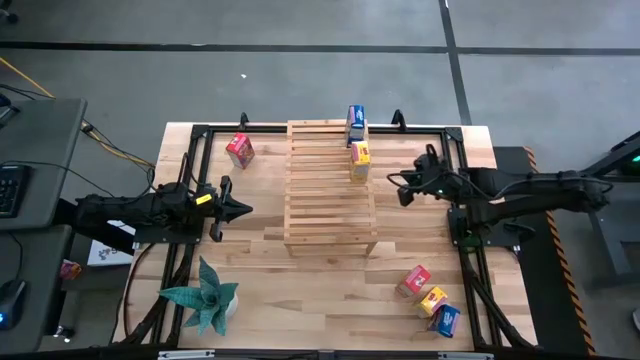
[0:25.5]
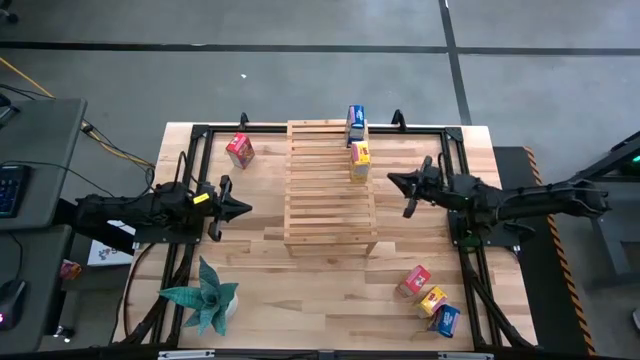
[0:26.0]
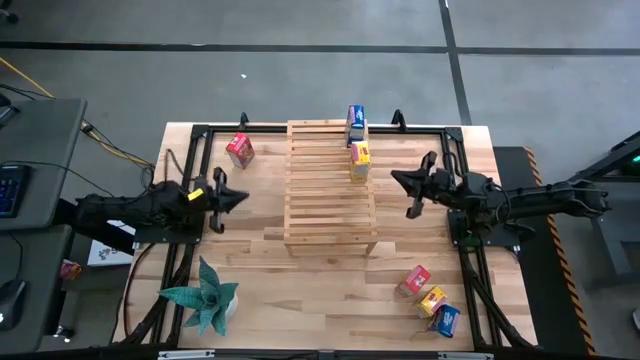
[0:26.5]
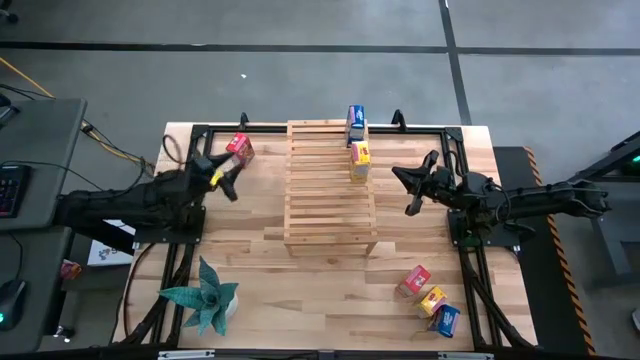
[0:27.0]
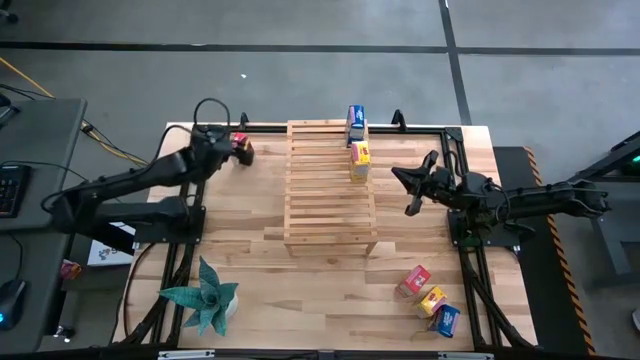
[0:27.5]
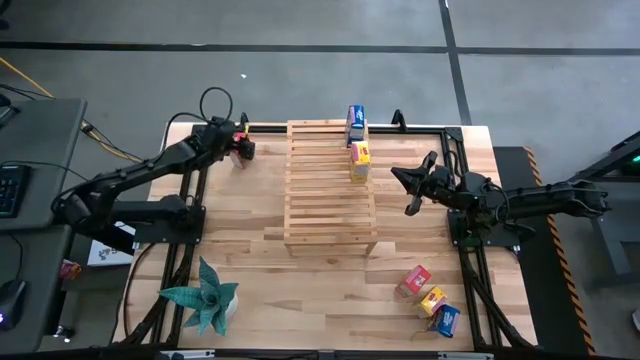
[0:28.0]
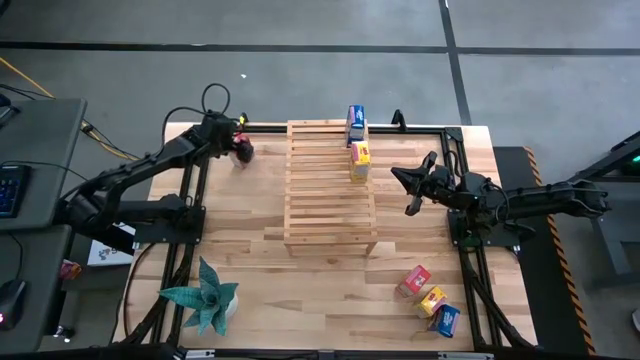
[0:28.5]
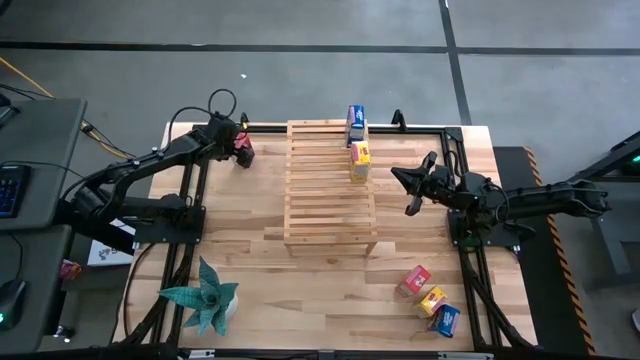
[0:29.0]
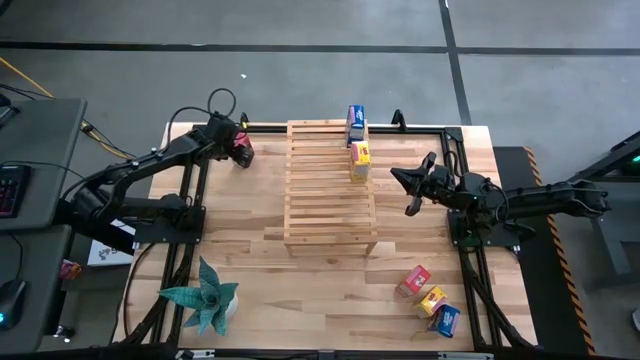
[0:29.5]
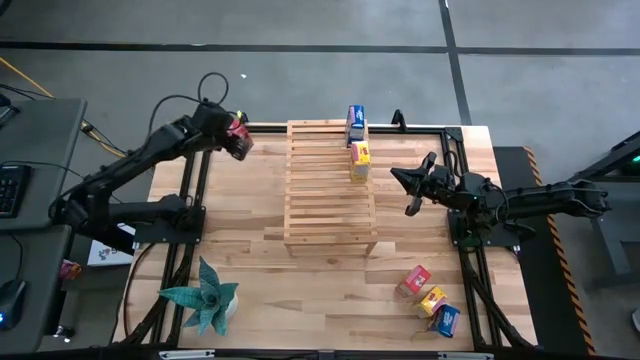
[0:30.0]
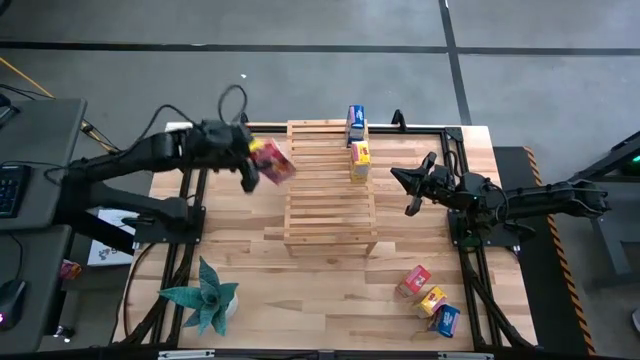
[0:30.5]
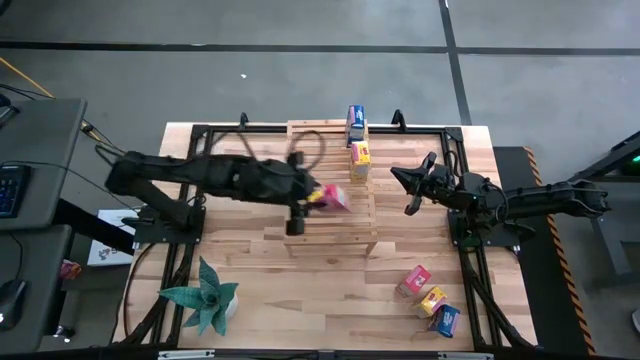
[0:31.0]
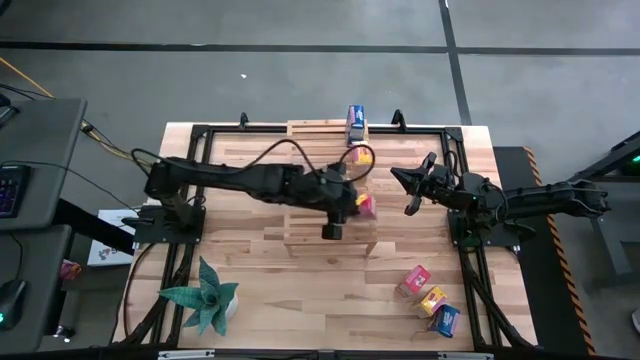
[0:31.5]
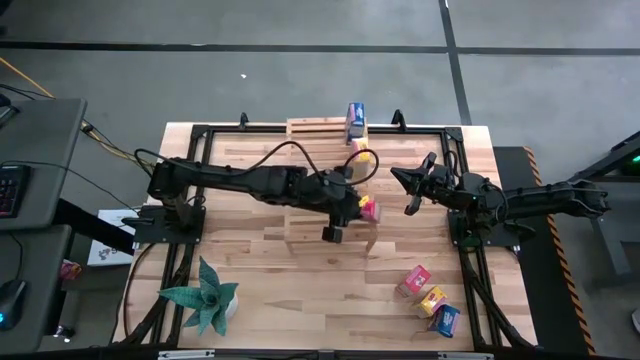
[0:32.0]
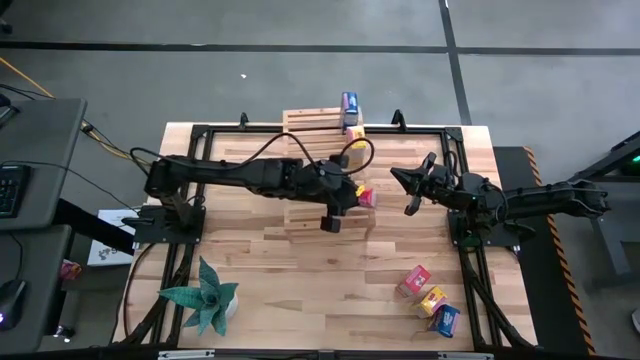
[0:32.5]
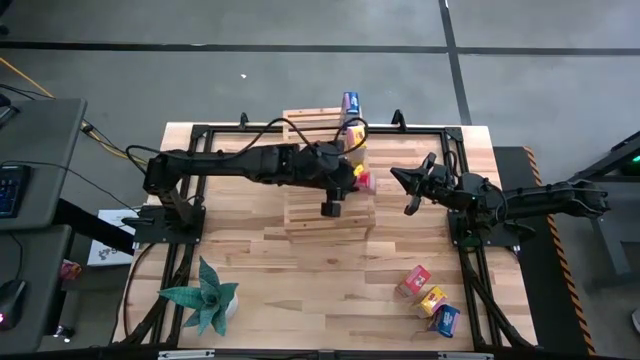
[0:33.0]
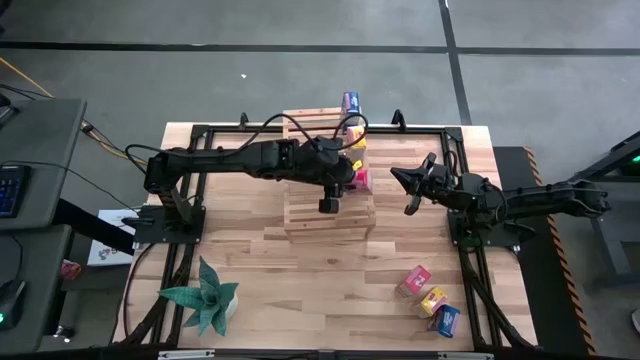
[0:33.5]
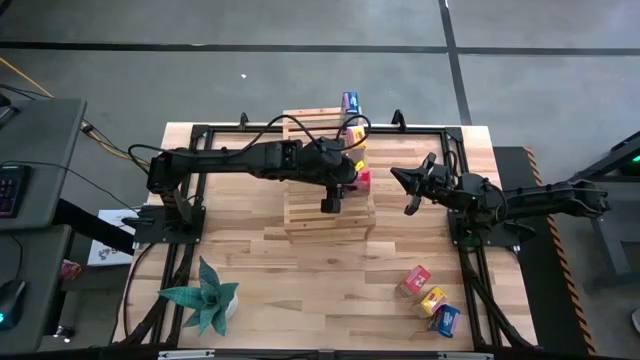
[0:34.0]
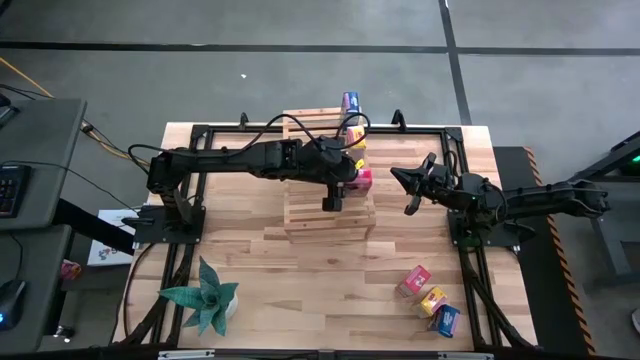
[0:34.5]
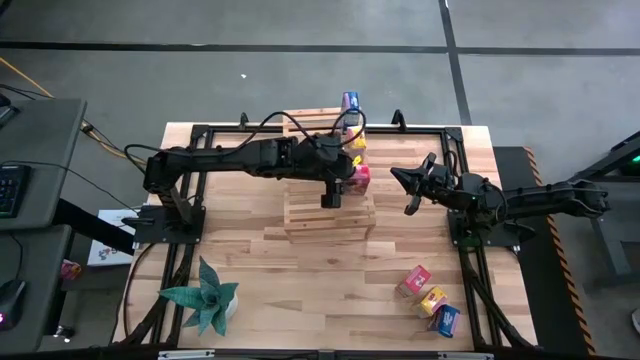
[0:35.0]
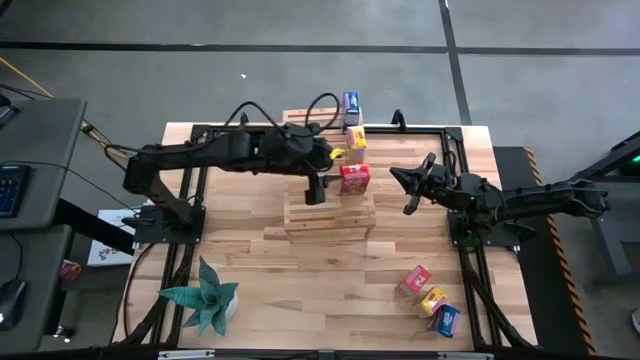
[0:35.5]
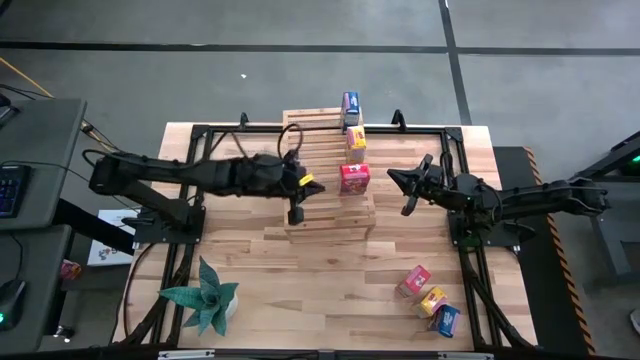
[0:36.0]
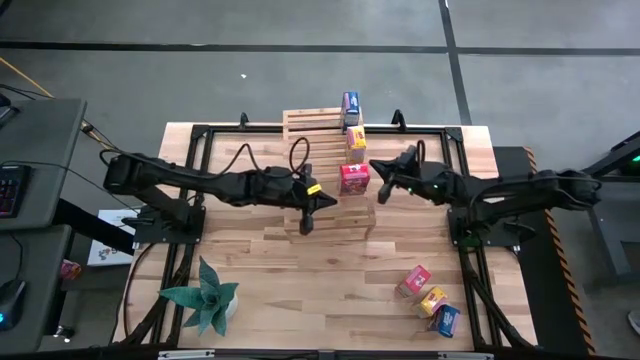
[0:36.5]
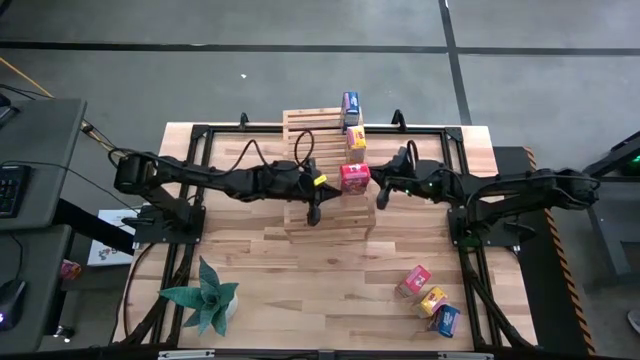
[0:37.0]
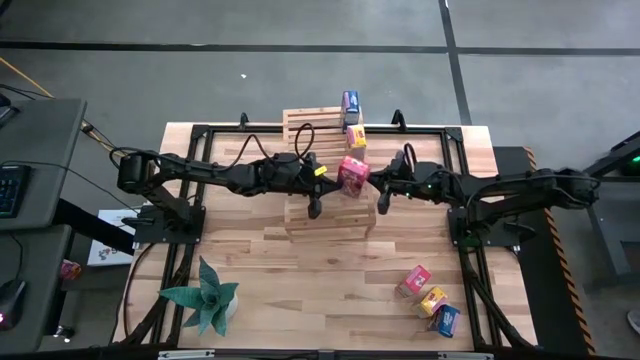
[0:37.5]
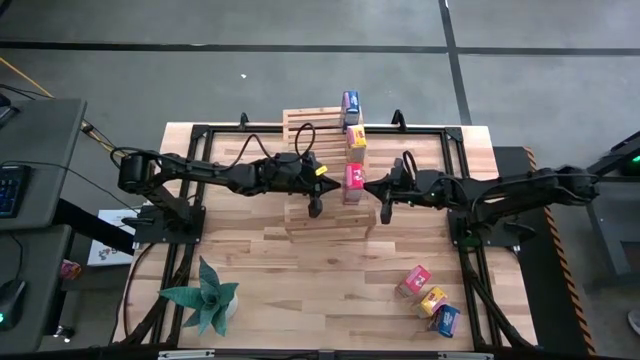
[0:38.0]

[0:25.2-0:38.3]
Task: Stack cereal on shelf
Put the top red cereal box on the shelf

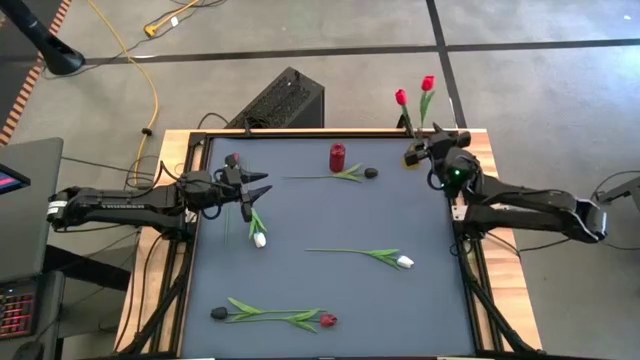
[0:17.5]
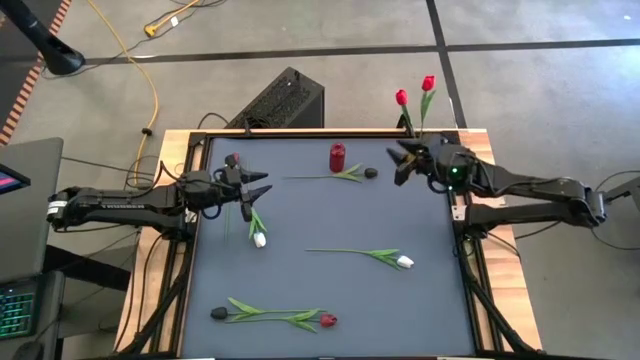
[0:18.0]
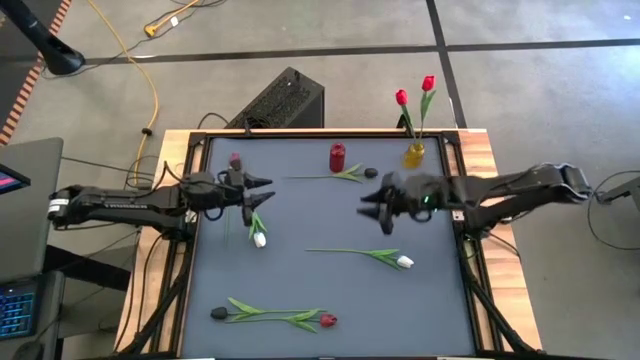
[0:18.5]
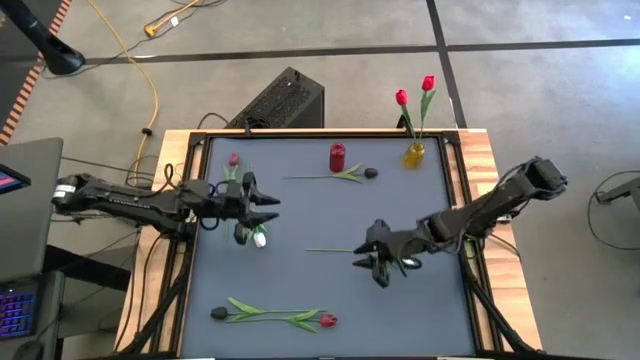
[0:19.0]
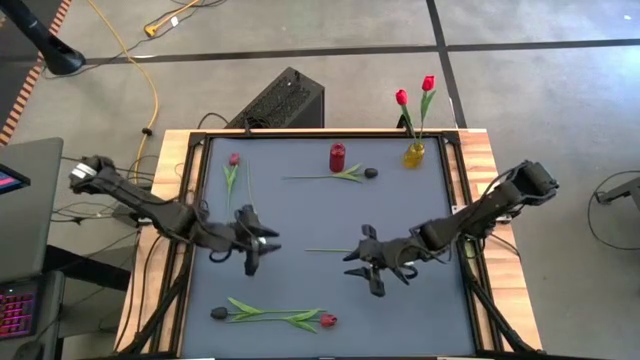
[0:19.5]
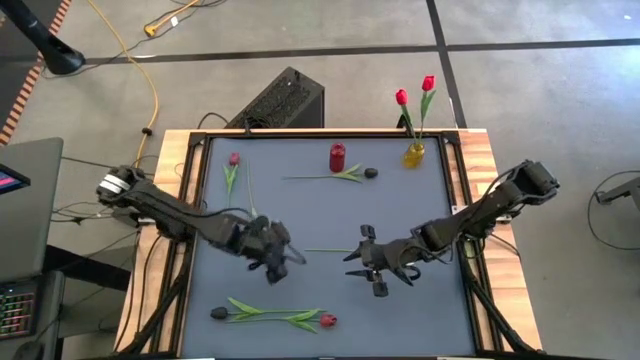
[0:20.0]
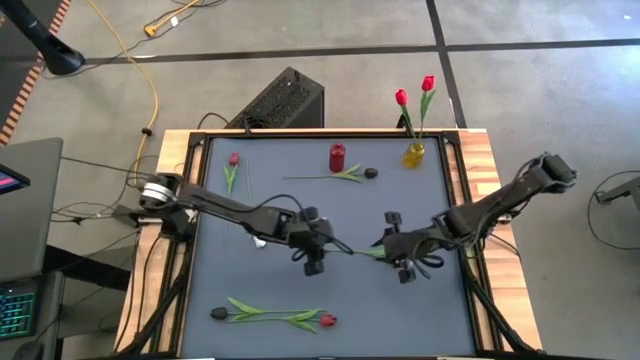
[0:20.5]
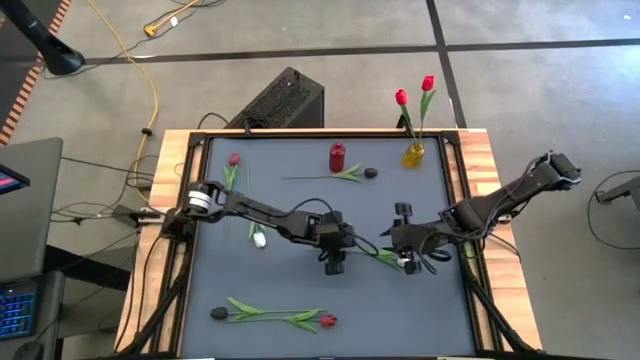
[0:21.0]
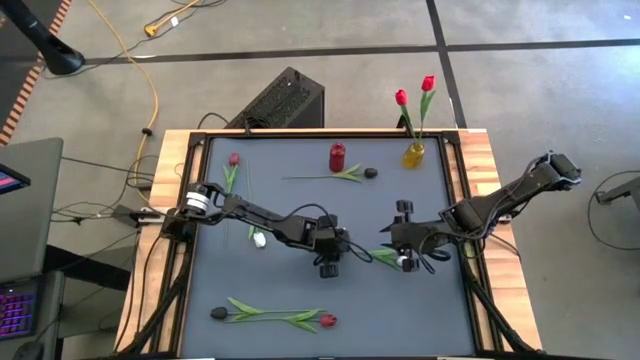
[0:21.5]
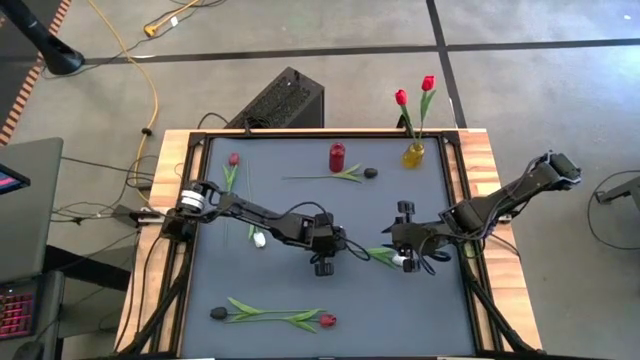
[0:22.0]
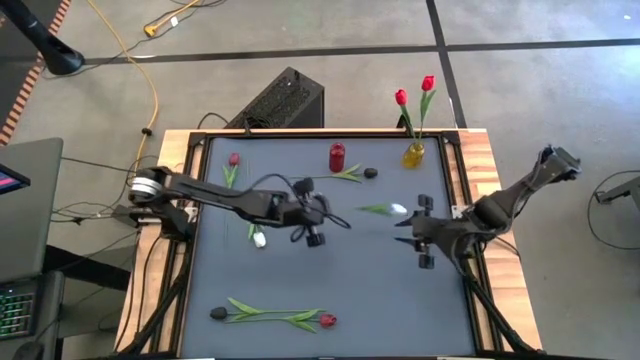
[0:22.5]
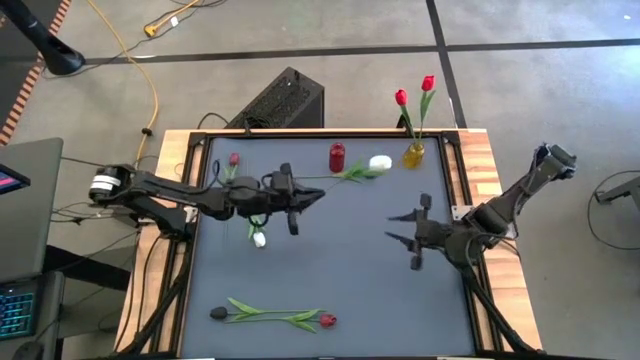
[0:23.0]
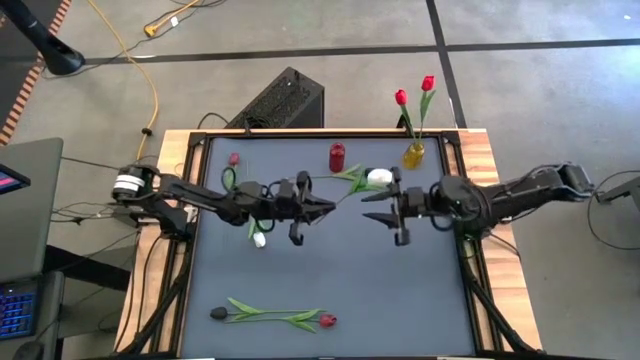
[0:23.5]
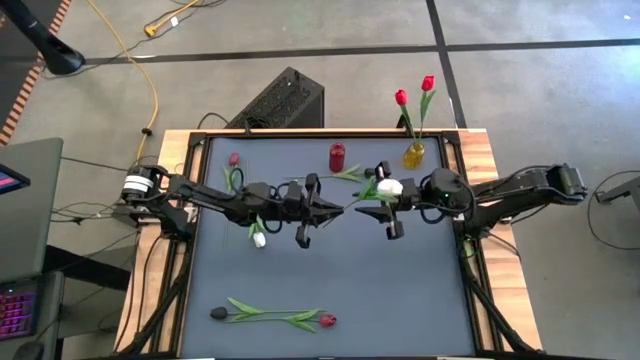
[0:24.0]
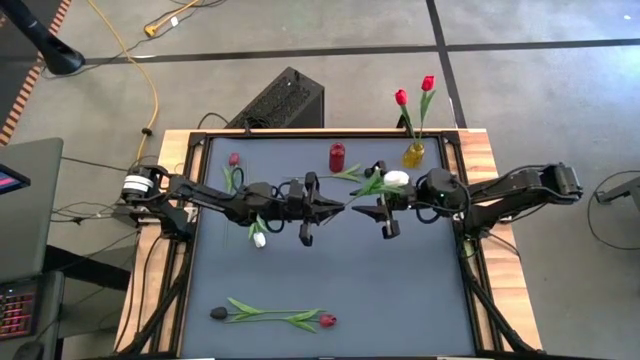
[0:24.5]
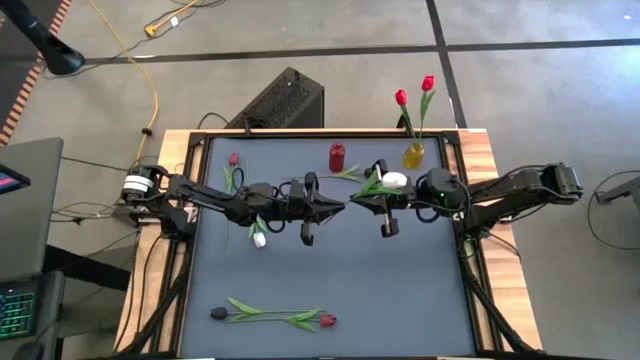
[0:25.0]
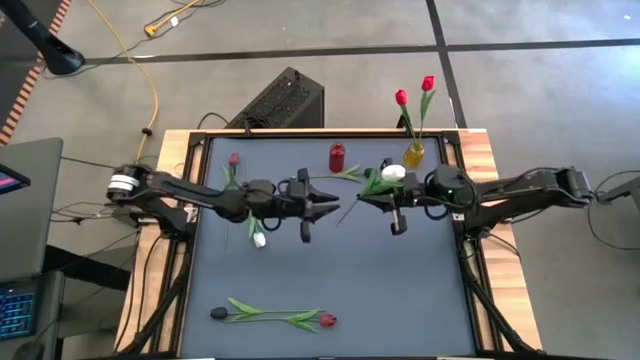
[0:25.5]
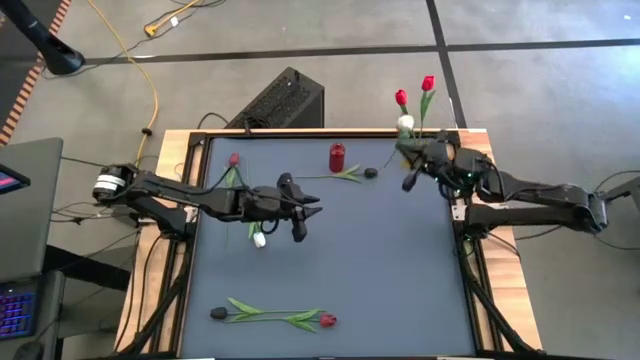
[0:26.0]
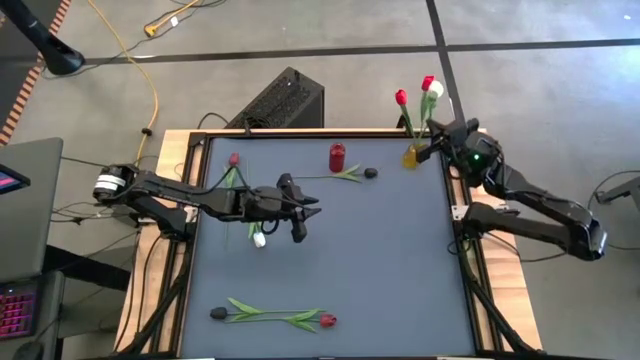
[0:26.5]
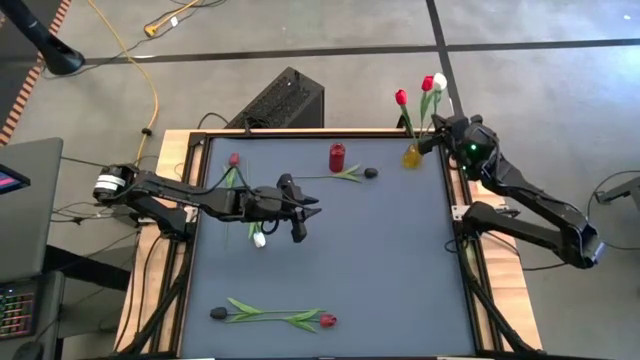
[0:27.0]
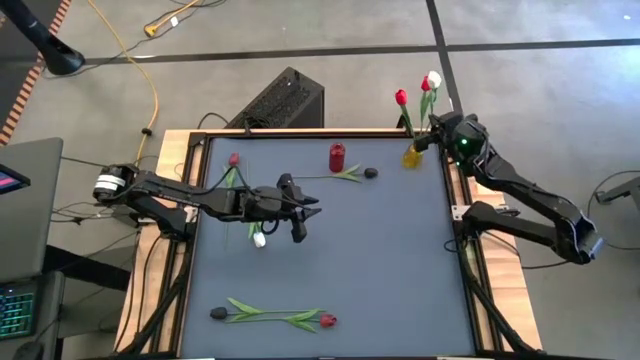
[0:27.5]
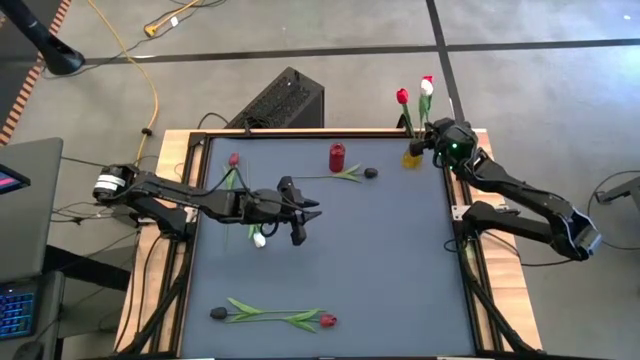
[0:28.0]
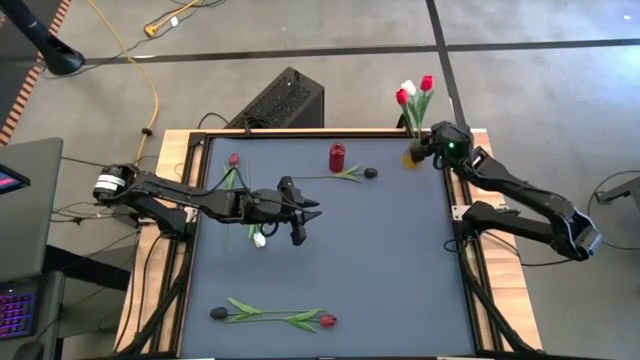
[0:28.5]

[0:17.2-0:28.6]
Task: Sort flowers into vase by color
Put the right white tulip into the yellow vase
